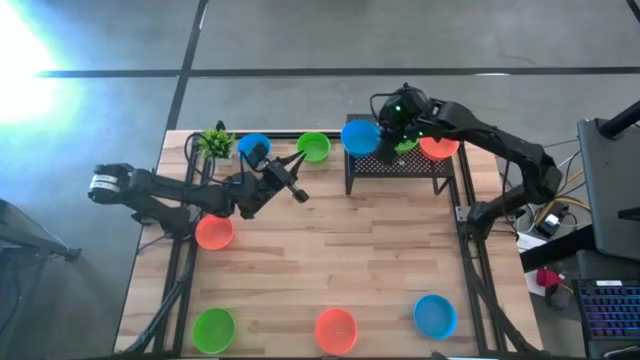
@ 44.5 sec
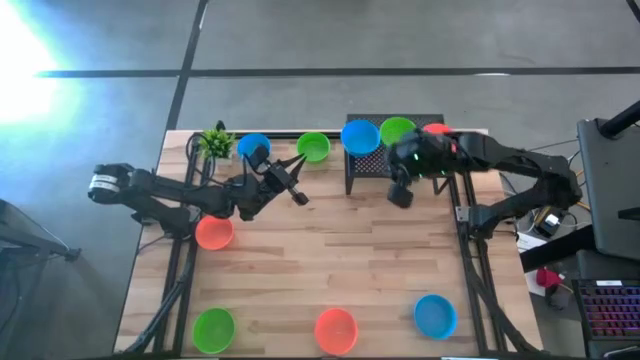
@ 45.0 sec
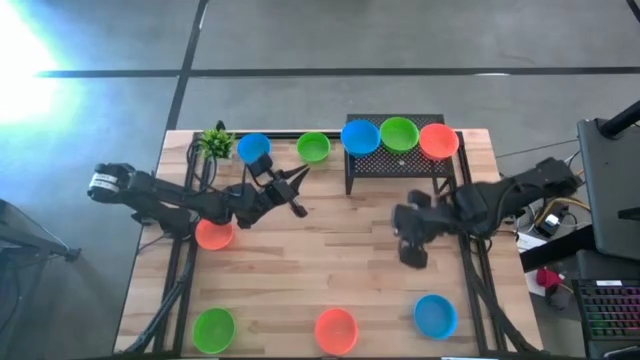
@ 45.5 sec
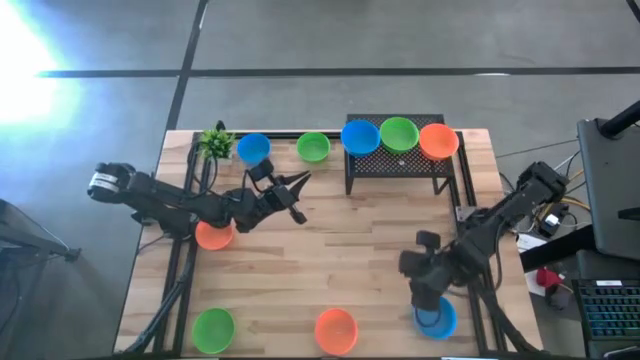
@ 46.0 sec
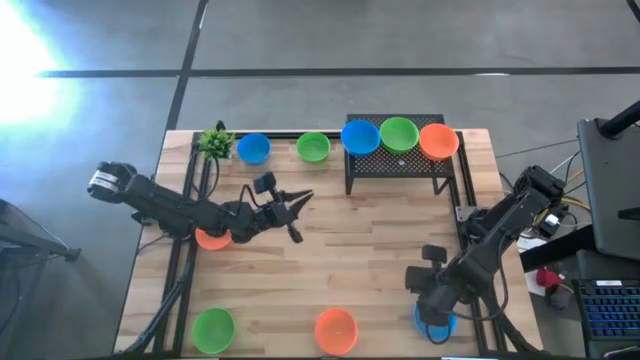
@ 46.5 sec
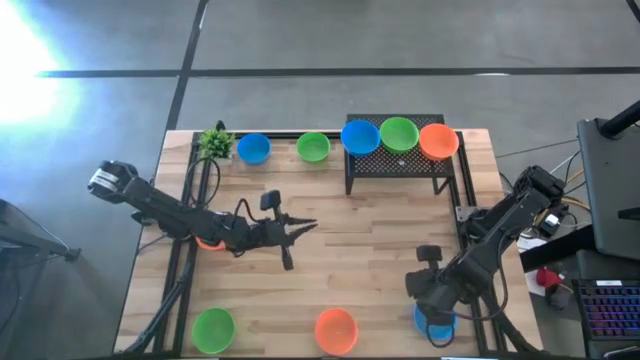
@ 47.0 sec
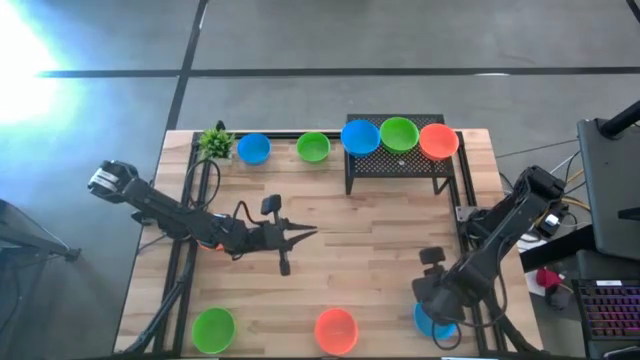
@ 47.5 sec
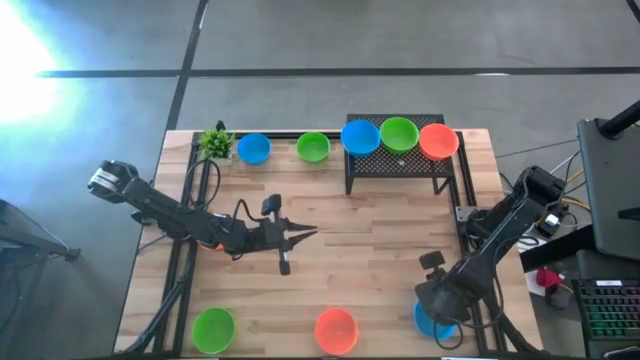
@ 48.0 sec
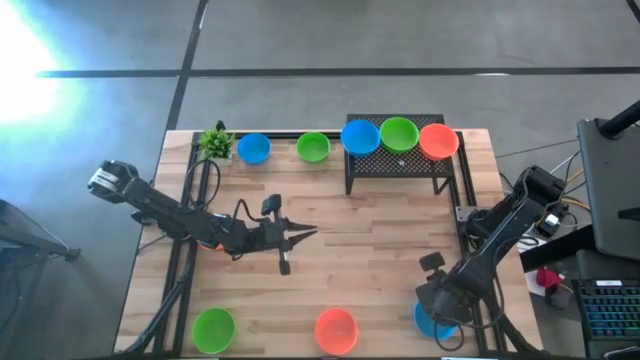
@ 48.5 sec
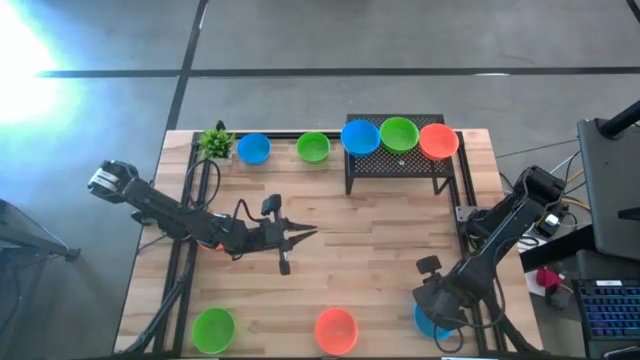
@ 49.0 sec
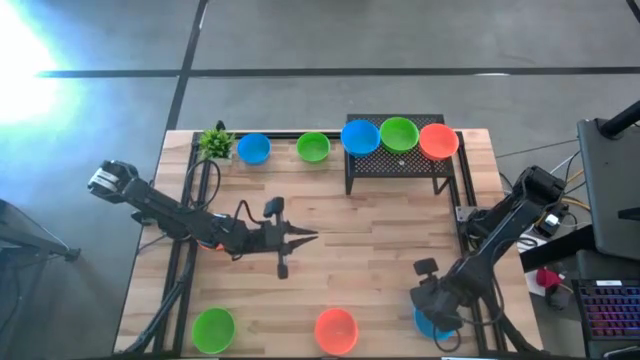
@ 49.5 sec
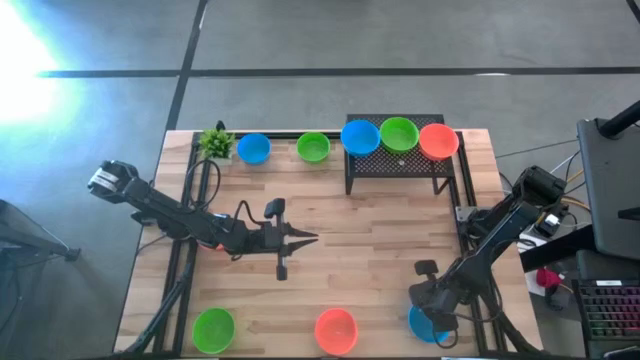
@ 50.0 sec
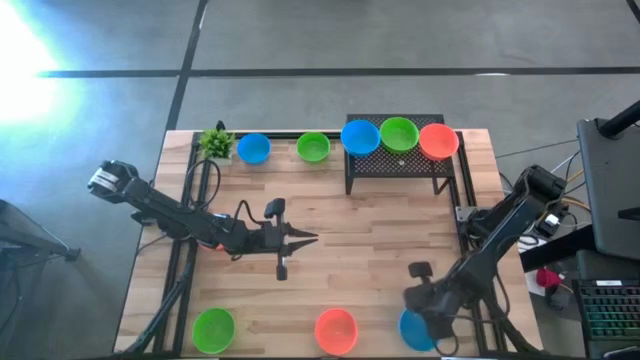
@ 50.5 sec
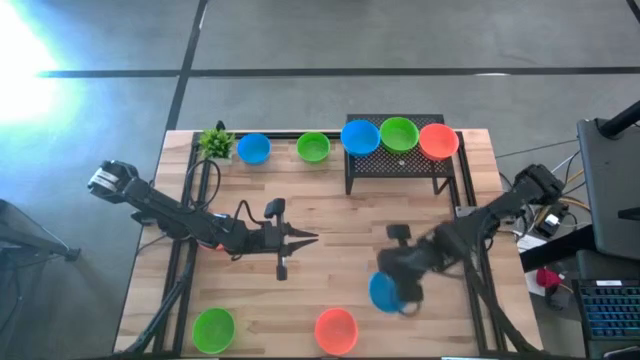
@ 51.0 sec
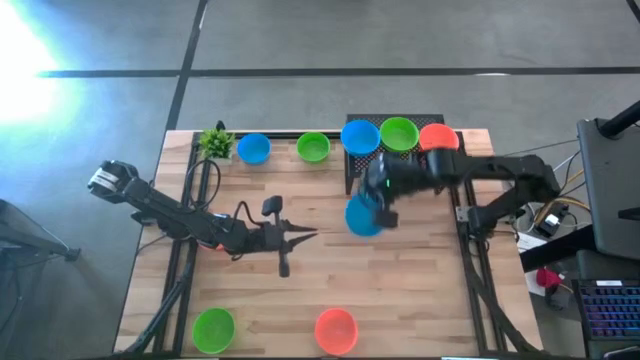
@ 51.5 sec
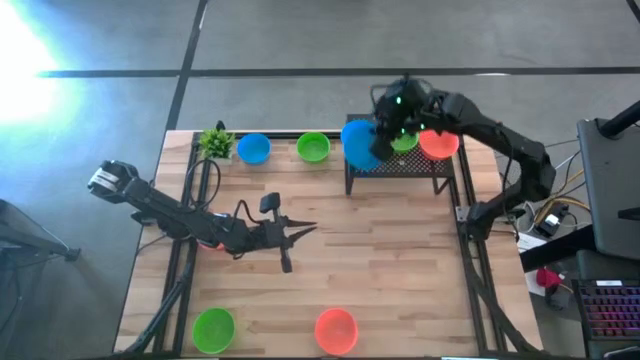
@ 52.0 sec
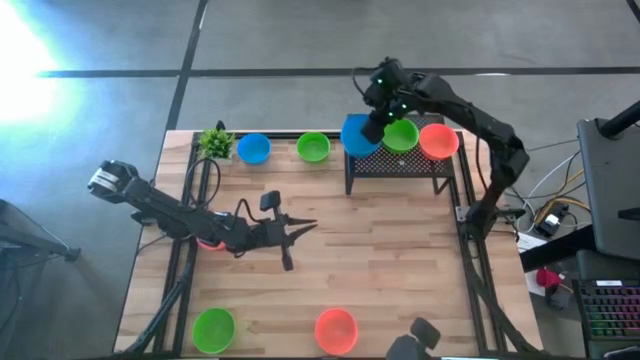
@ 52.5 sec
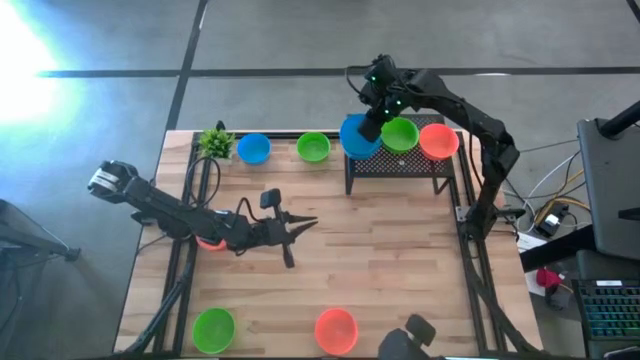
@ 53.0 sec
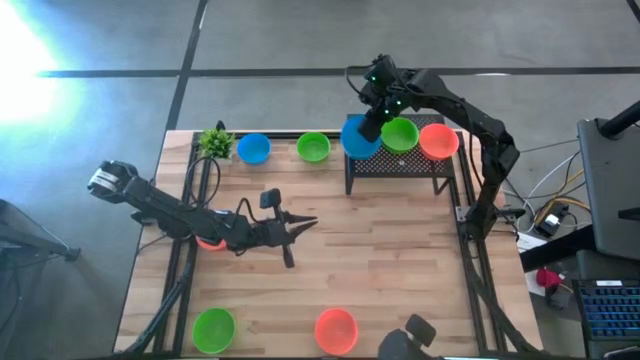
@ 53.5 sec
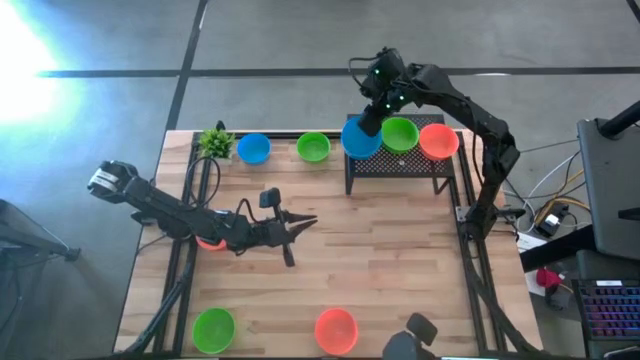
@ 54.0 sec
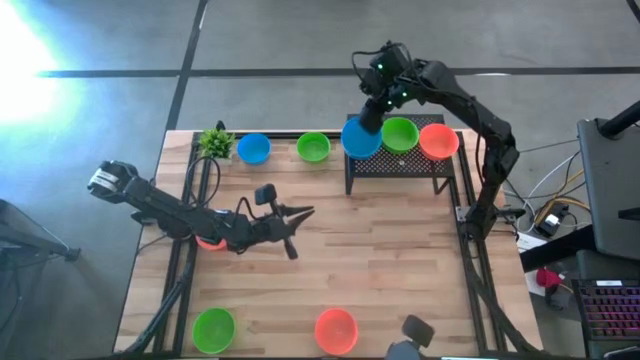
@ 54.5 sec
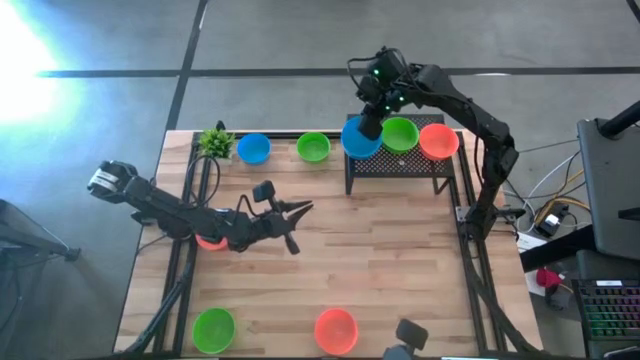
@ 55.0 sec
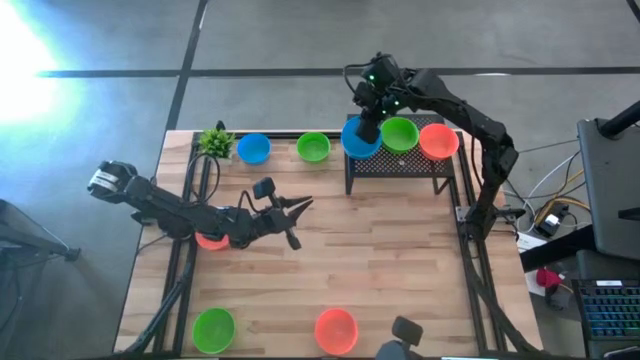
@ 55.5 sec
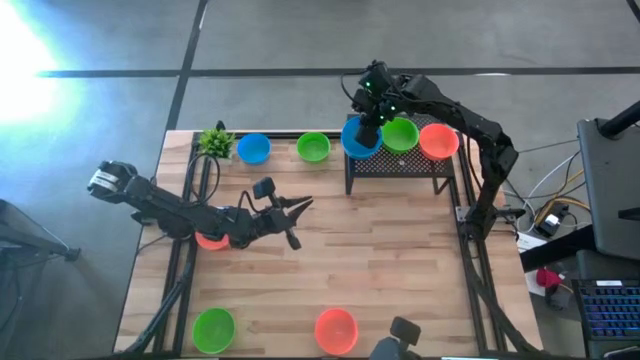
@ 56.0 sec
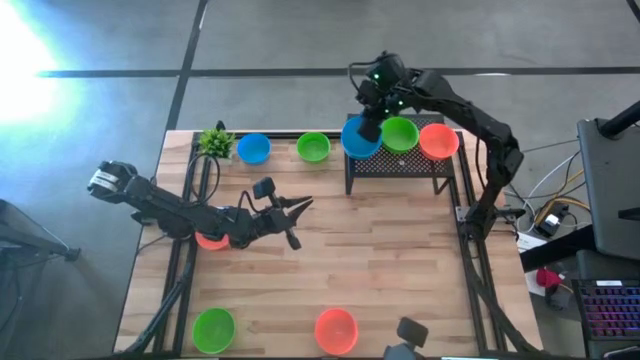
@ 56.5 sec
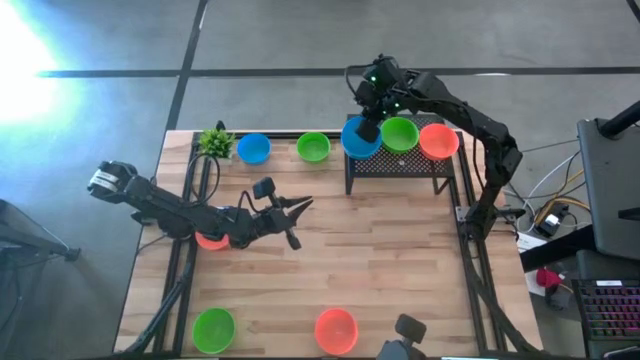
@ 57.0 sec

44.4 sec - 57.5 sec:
Task: Pick & Place Mini bowls
Stack the bottom blue bowl on the blue bowl on the shelf

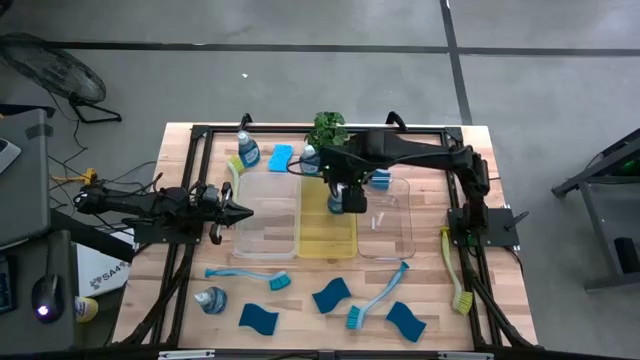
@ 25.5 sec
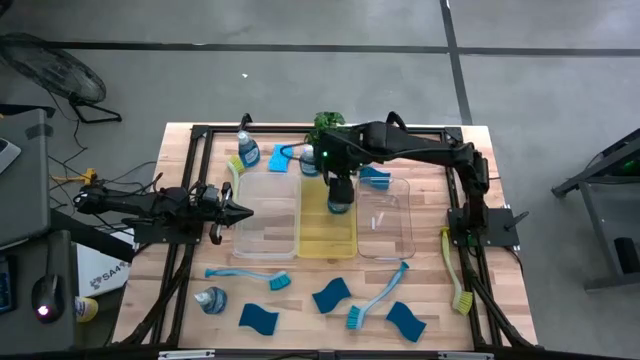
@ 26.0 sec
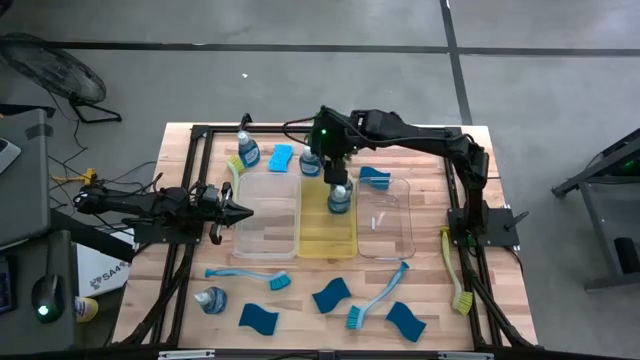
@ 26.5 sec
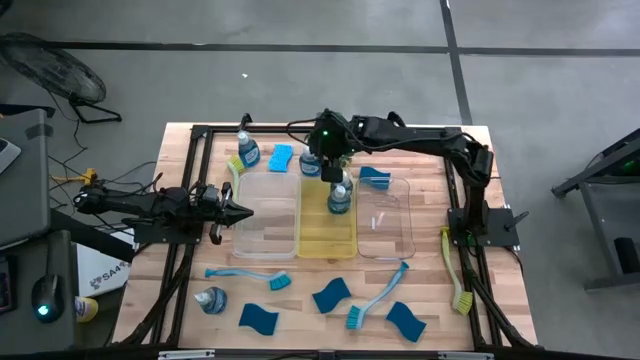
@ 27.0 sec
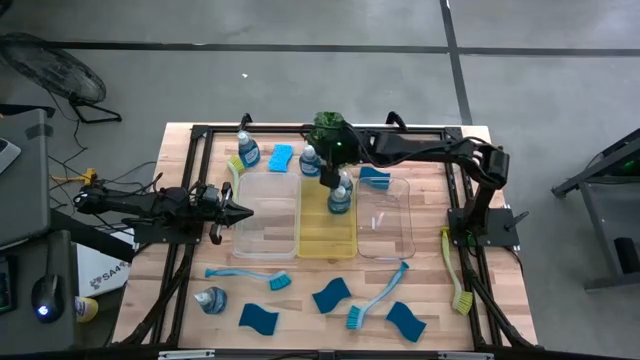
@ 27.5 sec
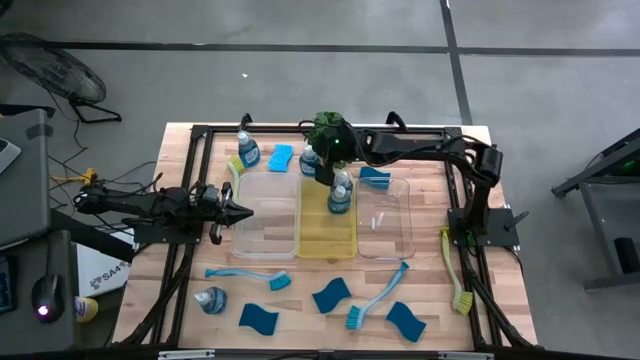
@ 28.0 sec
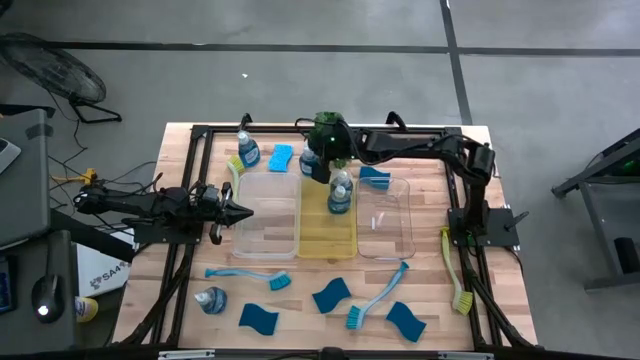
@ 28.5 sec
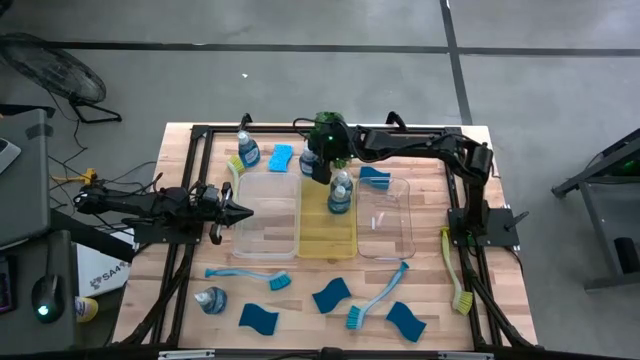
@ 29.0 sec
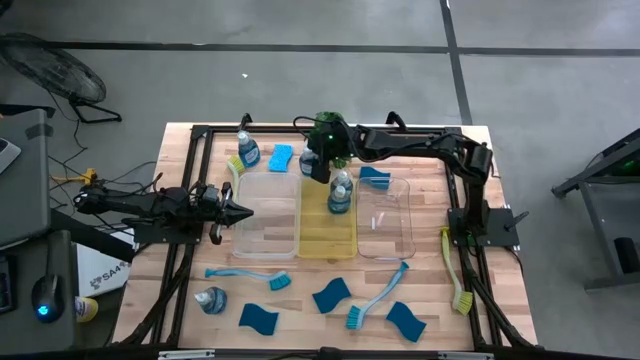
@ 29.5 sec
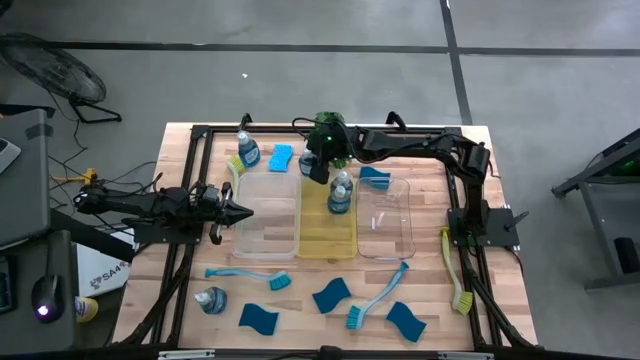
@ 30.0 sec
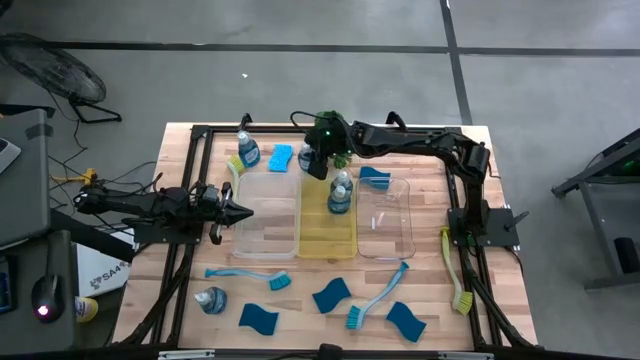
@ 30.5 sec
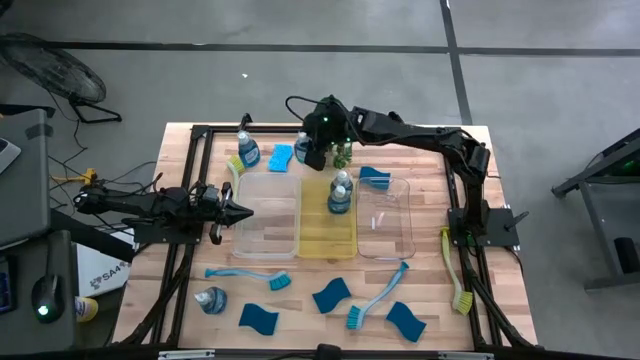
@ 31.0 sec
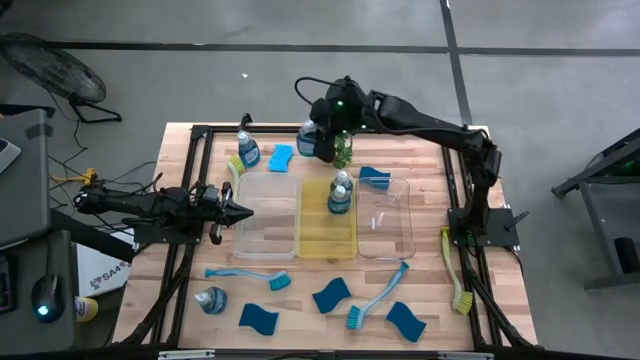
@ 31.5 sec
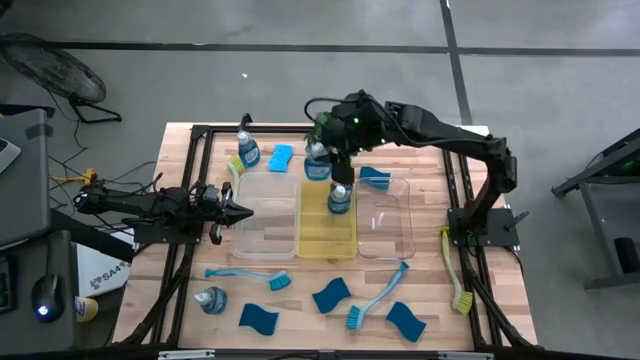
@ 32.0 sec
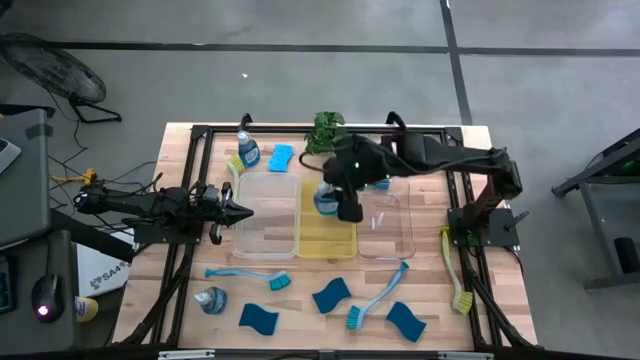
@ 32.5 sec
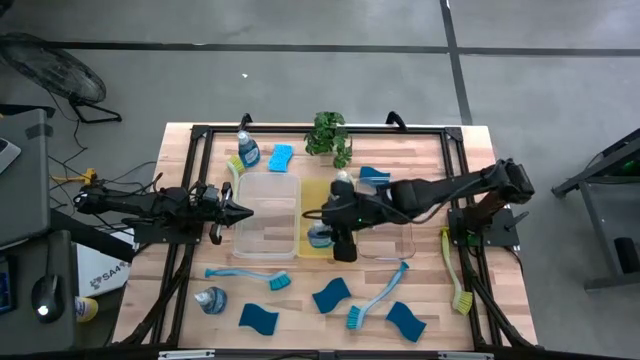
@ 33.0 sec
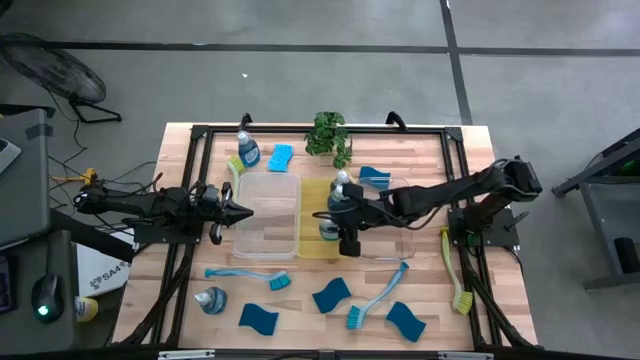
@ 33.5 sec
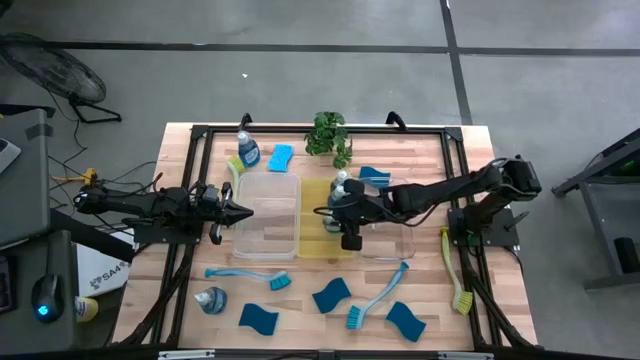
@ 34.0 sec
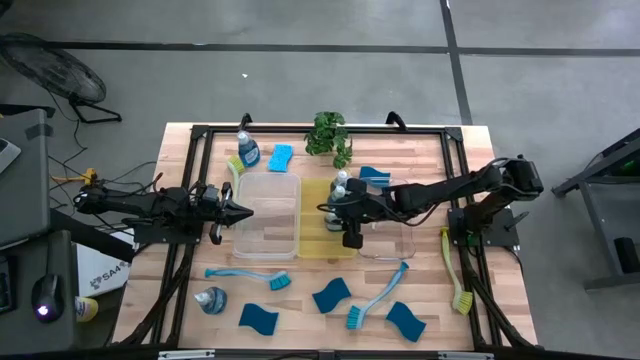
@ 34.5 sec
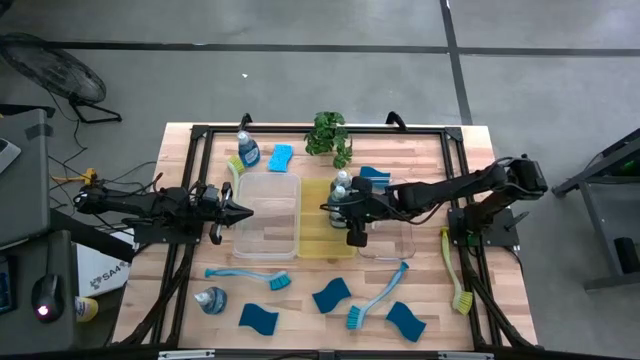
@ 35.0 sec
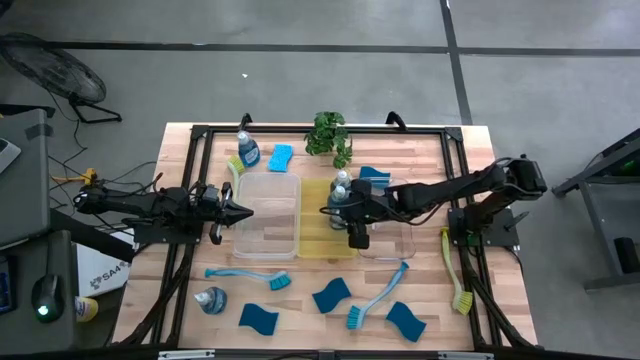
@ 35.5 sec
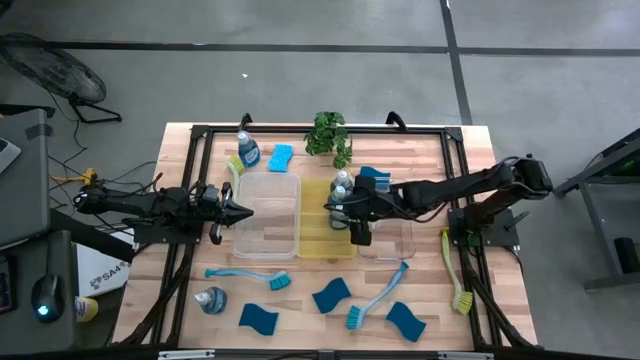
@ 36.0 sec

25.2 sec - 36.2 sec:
Task: Pick & Place Kitchen Sink Supplies
Put the dishwashing liquid bottle into the yellow bin
